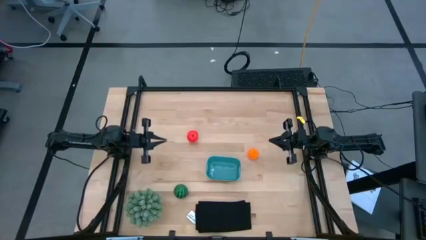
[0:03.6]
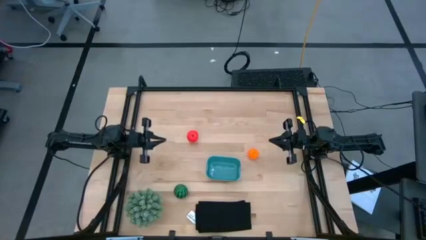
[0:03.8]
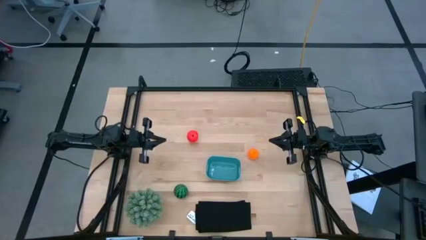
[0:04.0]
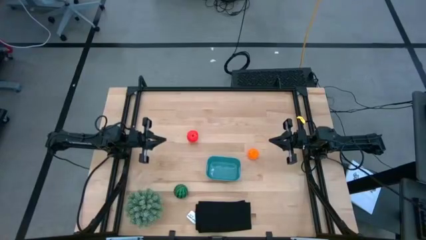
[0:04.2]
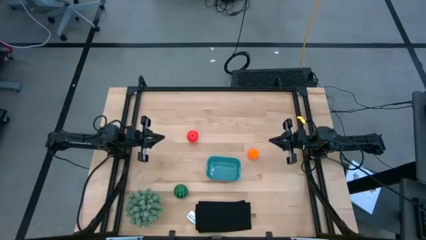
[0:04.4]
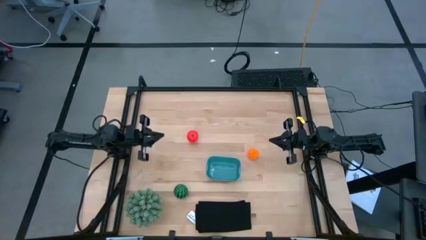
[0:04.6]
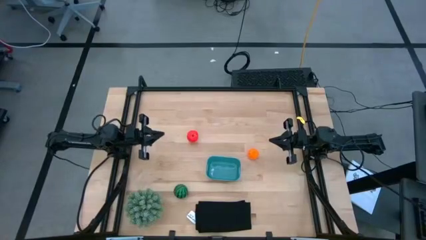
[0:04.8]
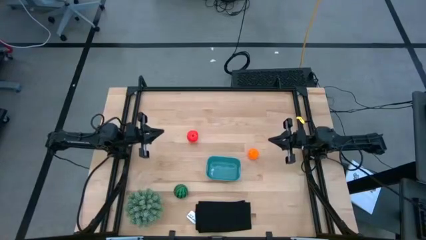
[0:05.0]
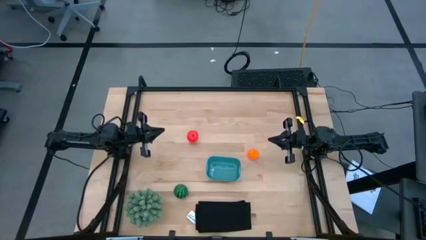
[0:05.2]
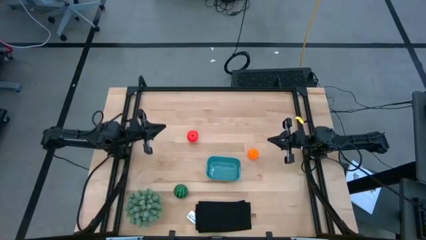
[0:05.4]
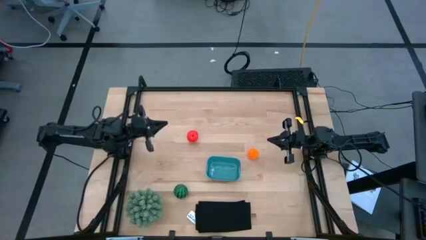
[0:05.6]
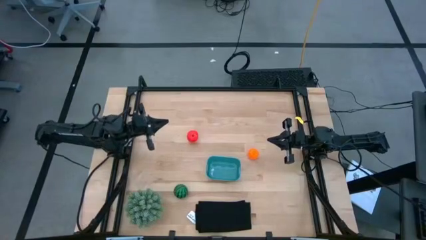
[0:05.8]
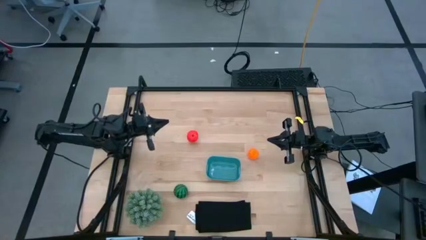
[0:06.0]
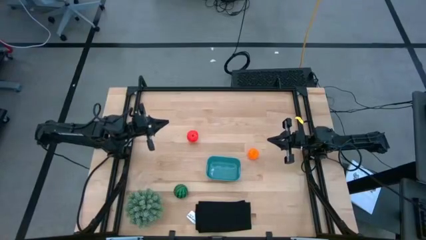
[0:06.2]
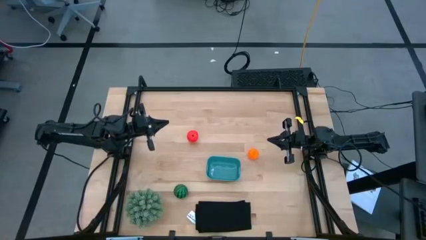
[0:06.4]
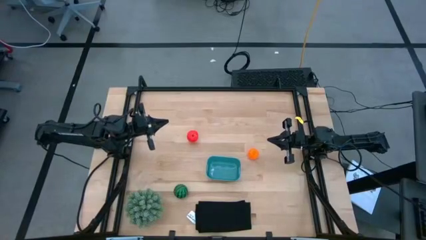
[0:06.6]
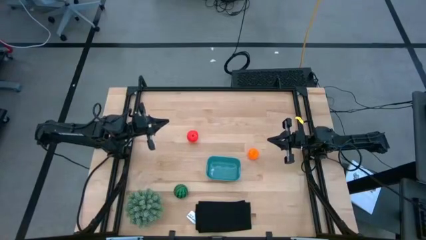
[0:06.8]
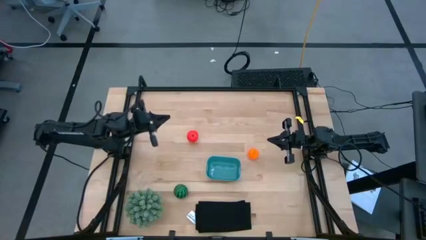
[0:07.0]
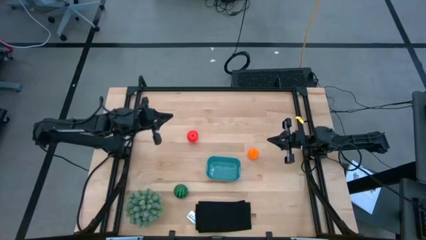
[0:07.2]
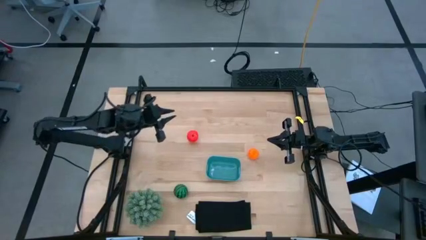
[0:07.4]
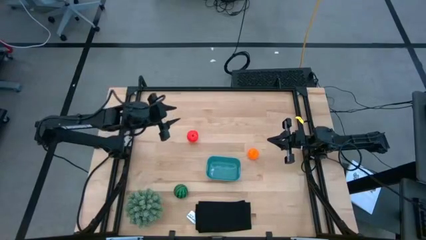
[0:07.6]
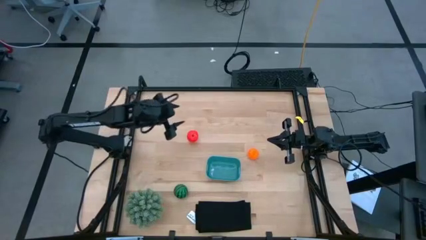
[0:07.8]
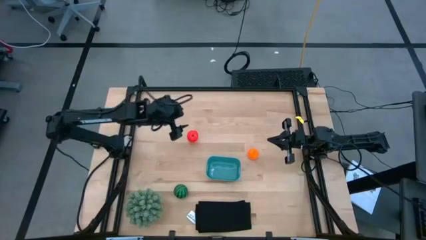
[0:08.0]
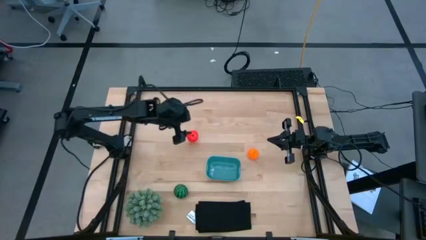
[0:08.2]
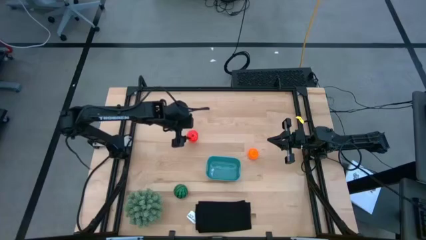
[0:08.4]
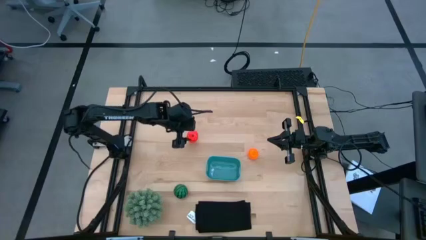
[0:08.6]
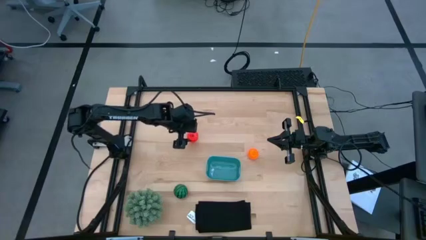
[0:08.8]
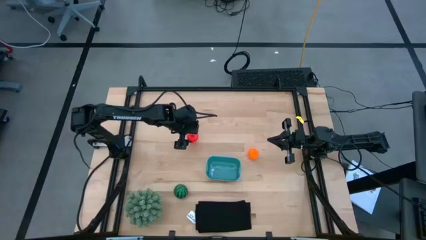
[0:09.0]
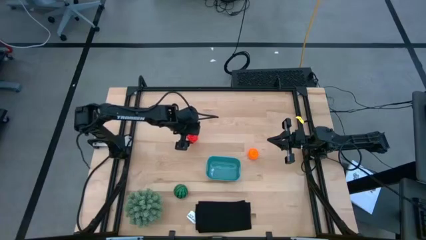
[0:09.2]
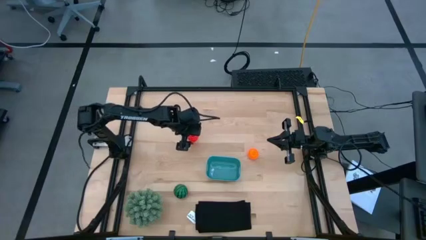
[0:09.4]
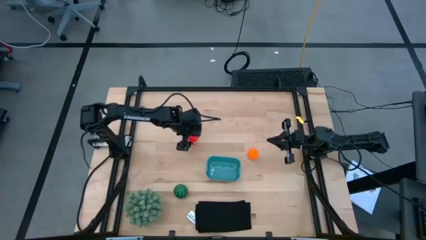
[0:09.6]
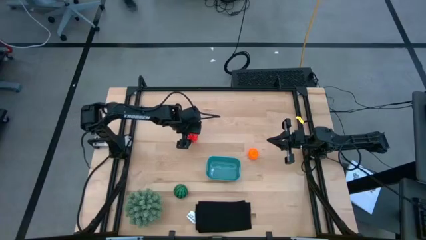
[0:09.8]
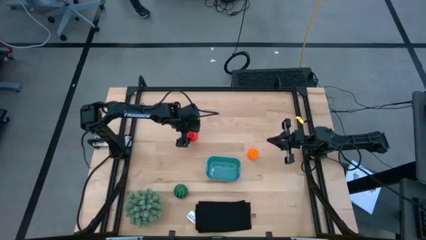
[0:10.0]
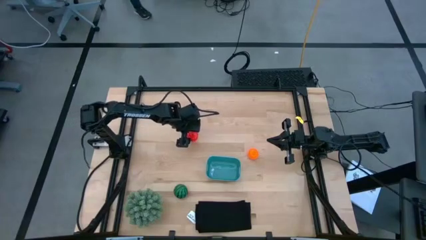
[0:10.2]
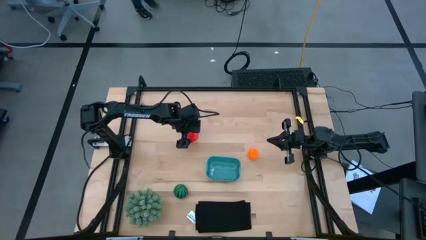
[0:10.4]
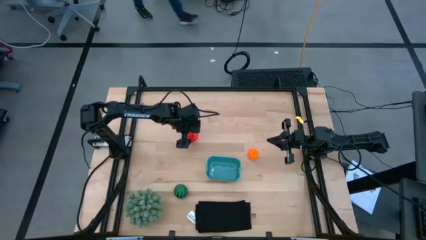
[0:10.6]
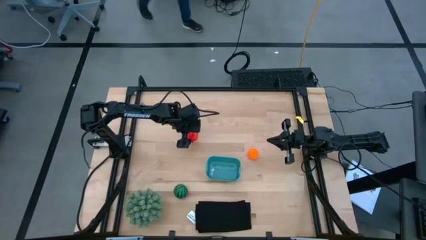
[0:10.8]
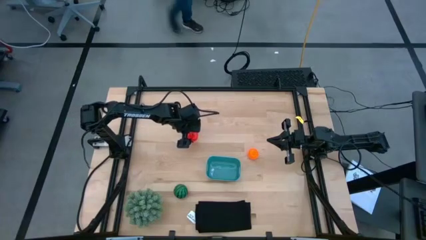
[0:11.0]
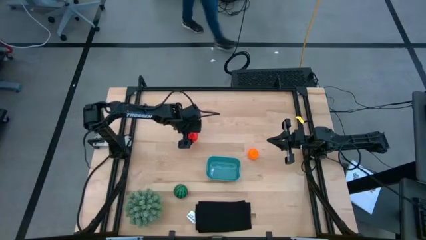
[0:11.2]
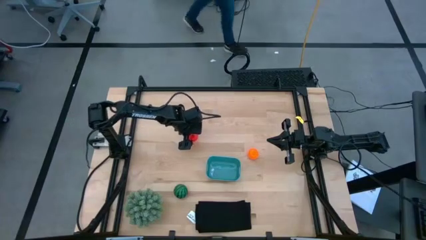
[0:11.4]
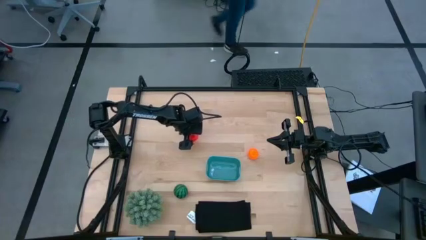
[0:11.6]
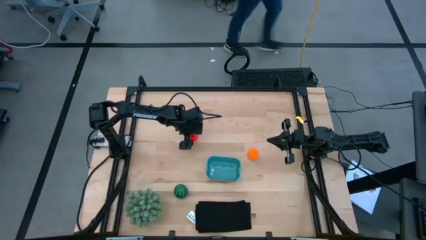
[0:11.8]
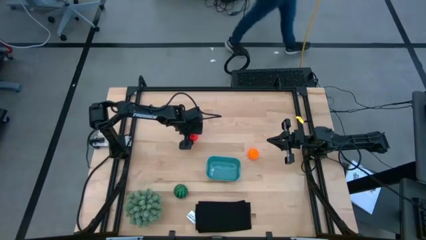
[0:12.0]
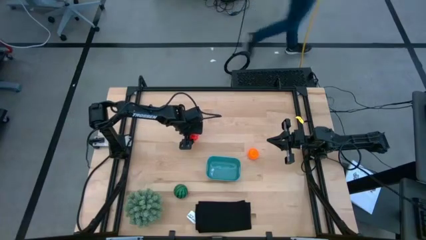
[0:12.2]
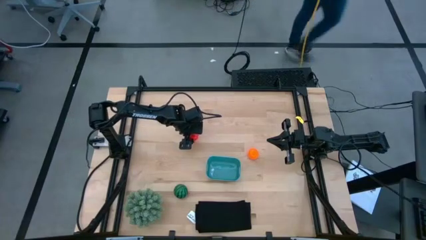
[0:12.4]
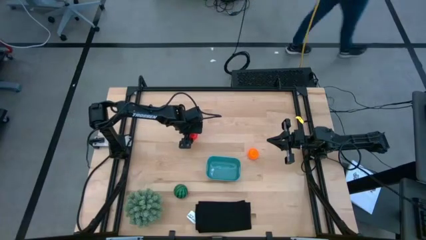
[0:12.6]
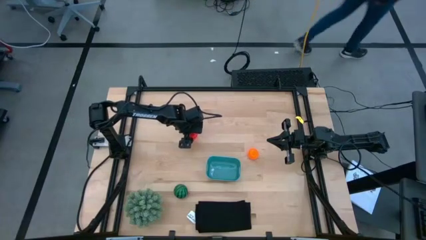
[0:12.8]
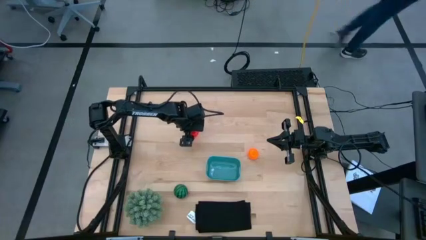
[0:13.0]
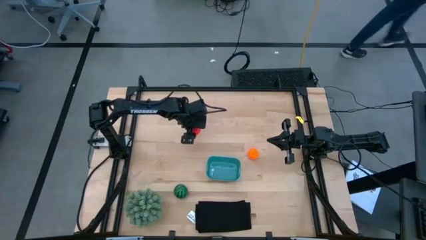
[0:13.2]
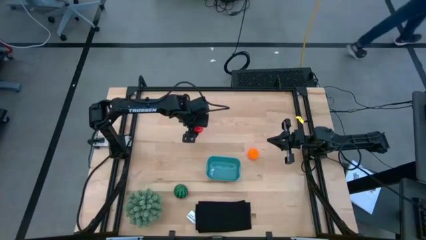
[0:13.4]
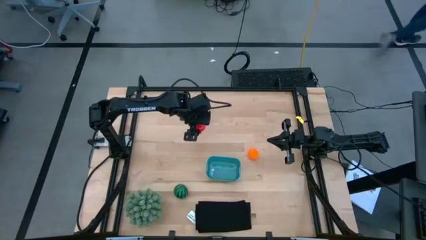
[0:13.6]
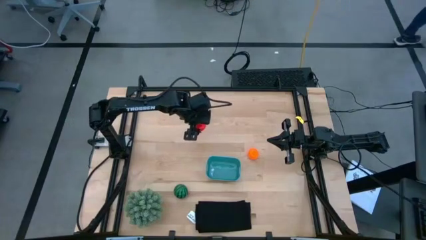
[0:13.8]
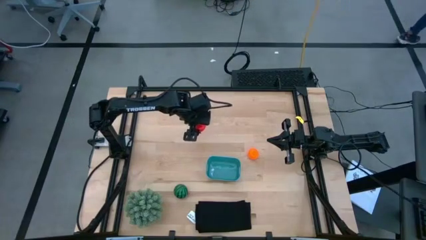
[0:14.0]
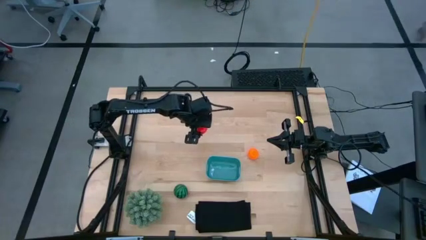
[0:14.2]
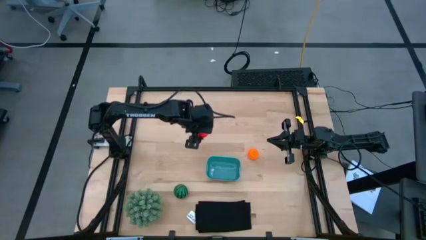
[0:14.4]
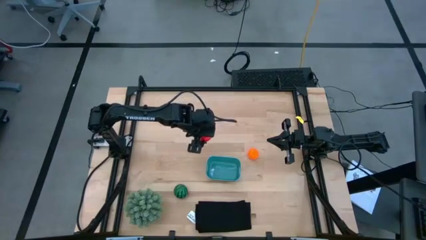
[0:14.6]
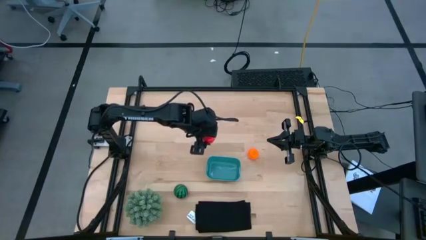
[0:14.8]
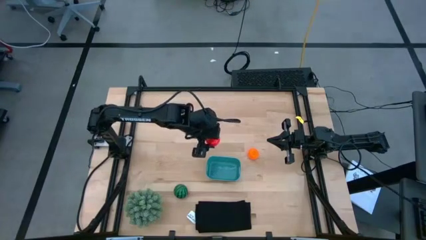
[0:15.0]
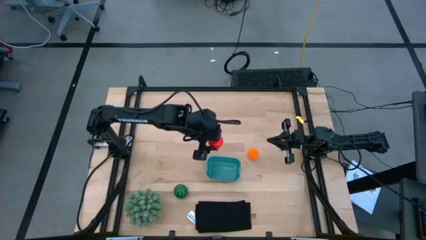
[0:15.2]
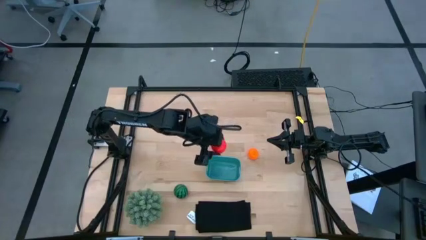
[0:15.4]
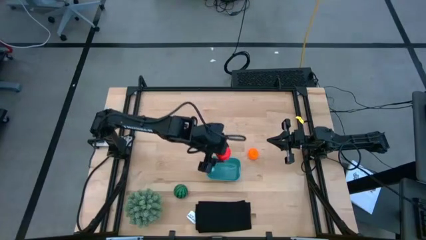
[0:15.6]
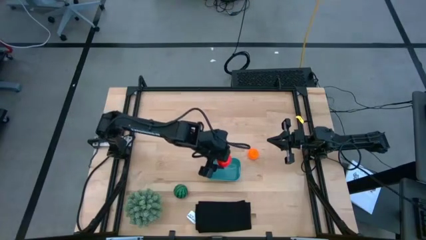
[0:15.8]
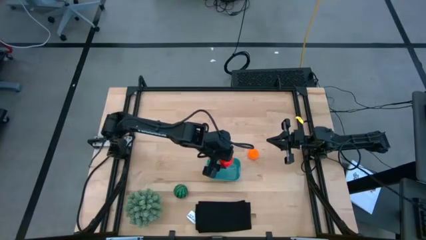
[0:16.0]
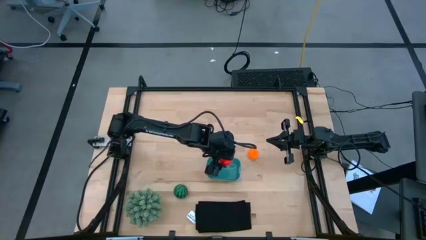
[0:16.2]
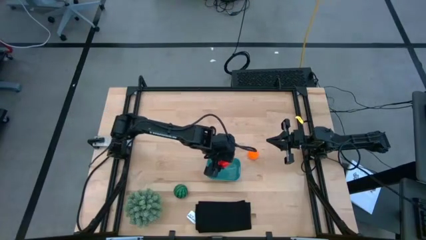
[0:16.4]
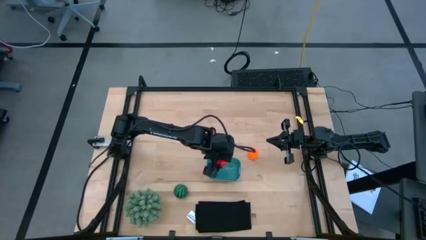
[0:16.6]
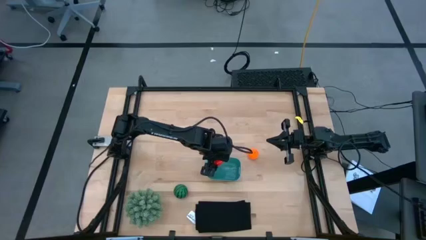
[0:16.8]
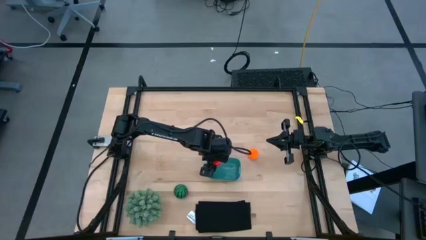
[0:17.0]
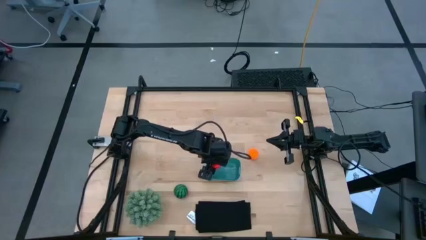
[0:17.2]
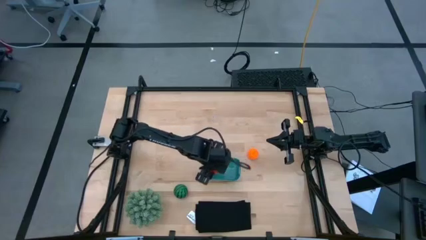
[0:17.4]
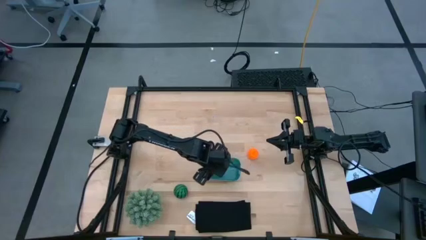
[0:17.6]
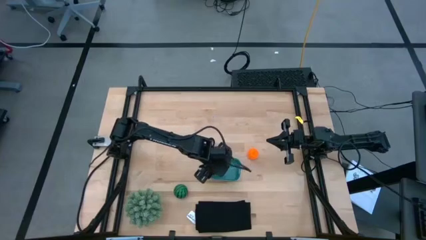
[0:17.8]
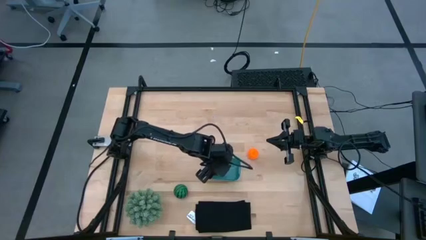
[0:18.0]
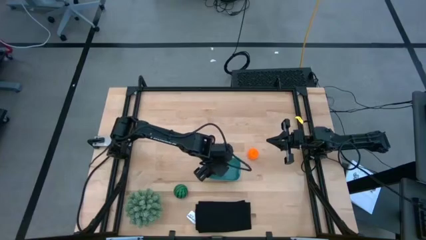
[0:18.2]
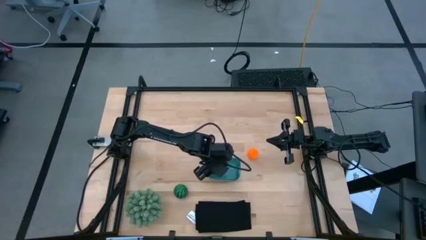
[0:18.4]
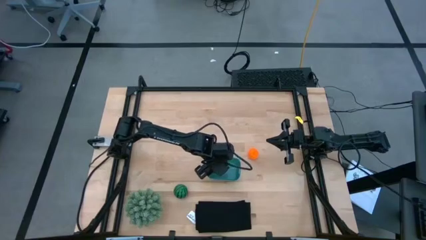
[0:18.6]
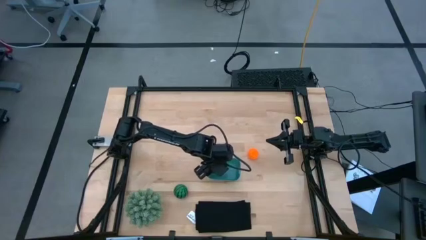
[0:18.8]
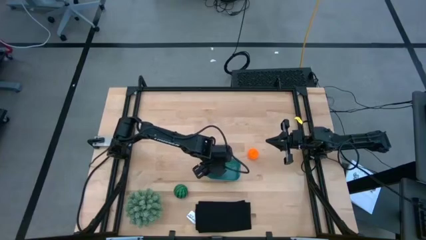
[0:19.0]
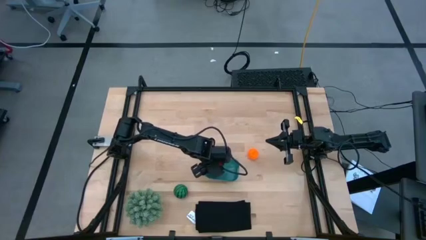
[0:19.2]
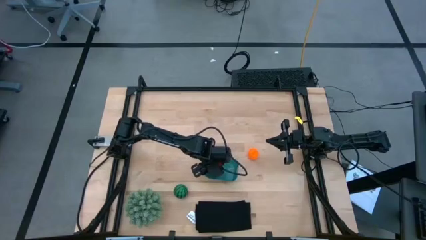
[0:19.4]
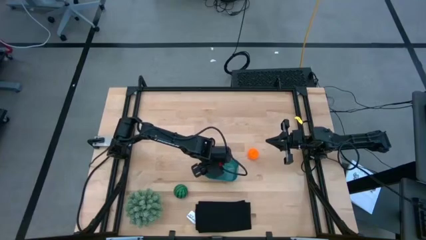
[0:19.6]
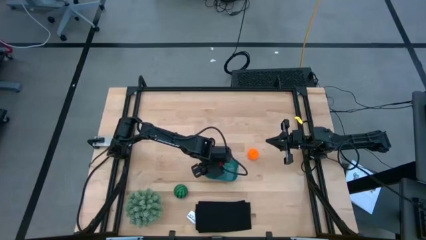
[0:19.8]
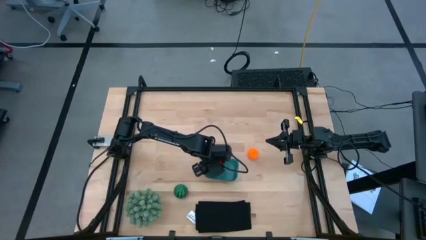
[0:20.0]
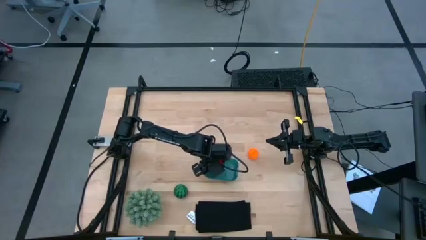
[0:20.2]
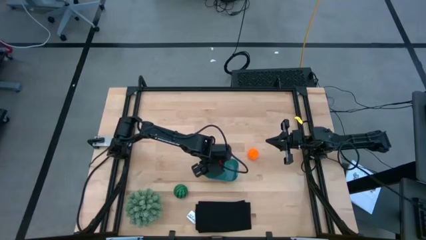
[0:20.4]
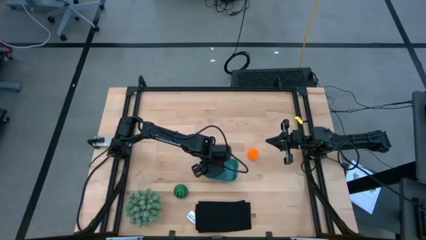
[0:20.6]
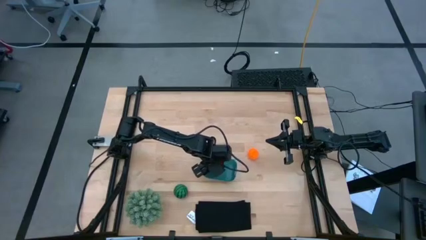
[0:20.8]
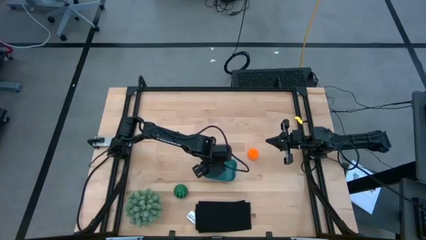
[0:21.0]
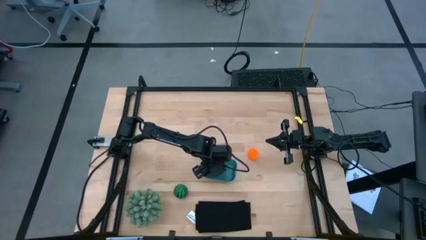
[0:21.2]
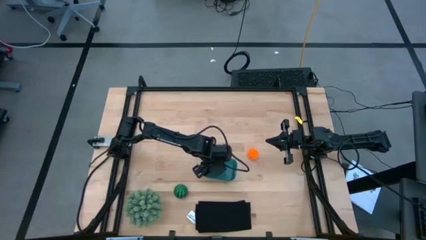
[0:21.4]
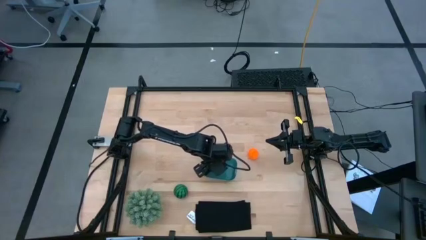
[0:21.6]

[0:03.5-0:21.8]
Task: Pick and placing Produce into tupperware
Put the apple into the basket
